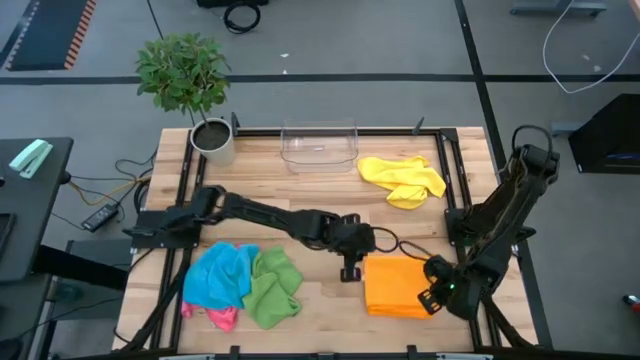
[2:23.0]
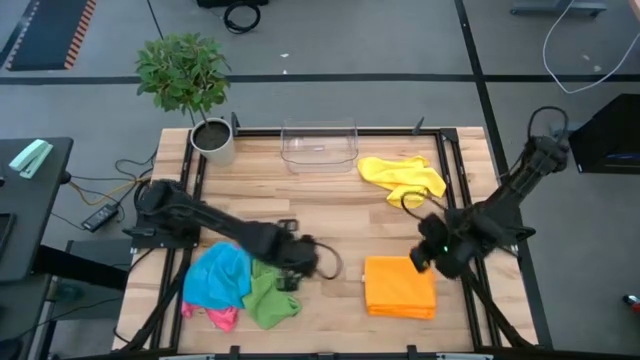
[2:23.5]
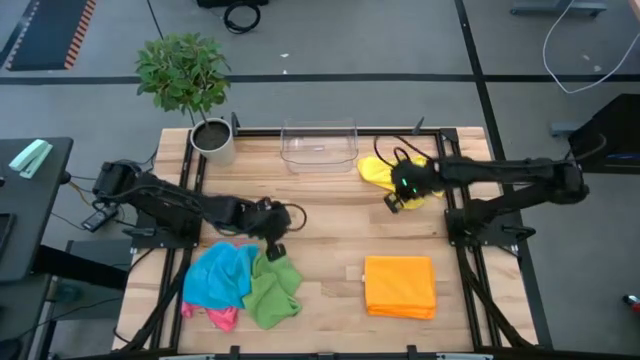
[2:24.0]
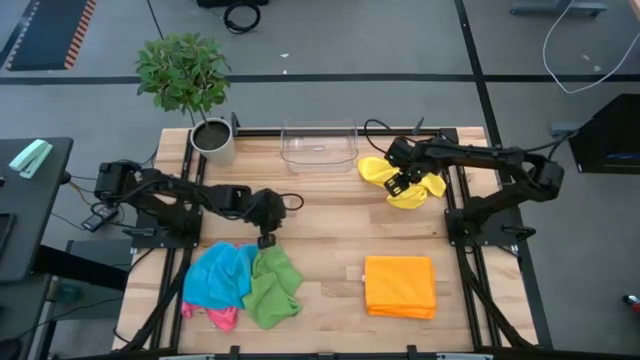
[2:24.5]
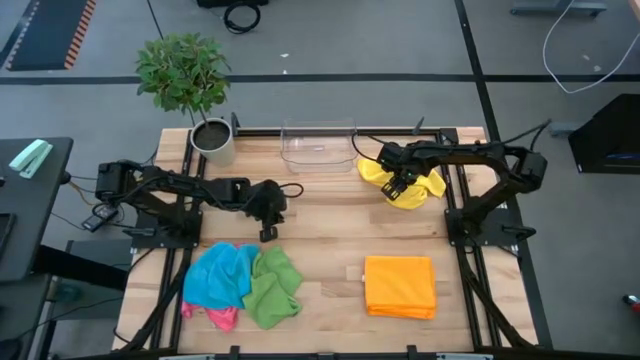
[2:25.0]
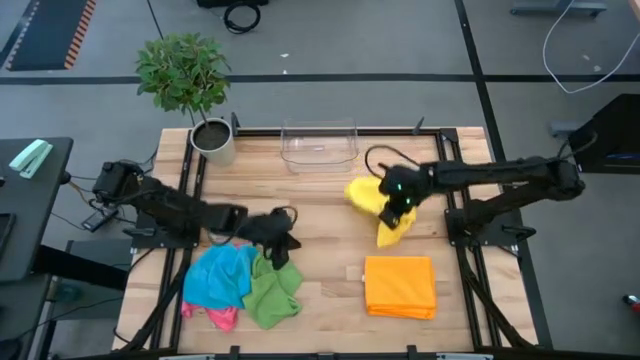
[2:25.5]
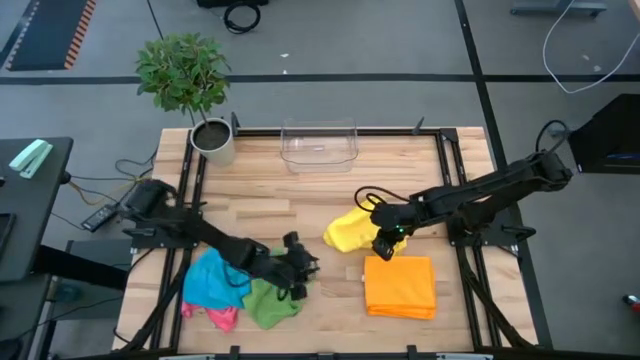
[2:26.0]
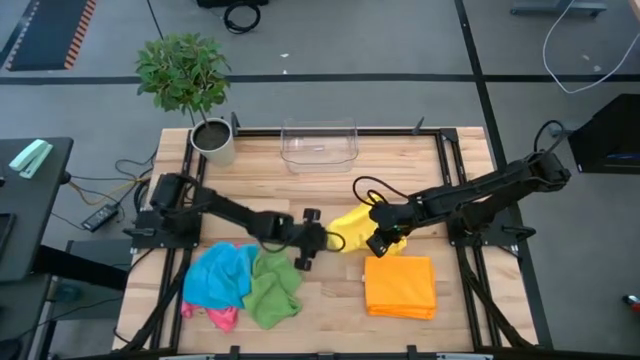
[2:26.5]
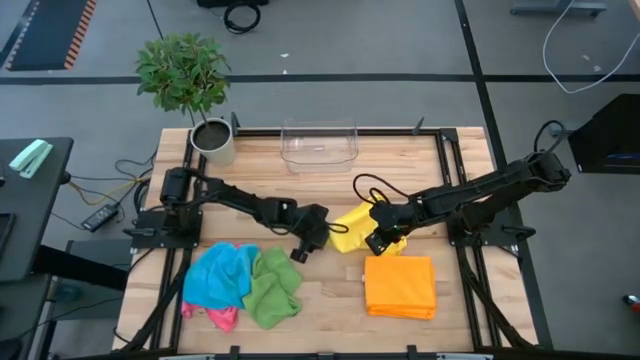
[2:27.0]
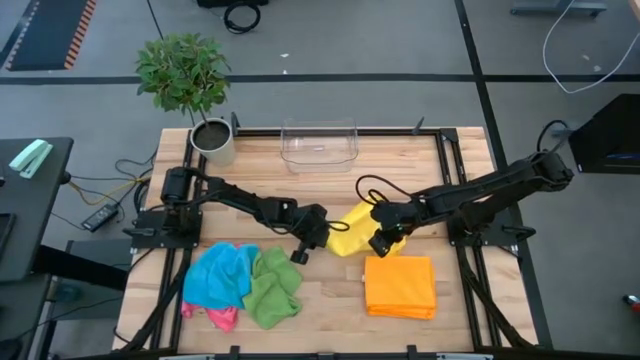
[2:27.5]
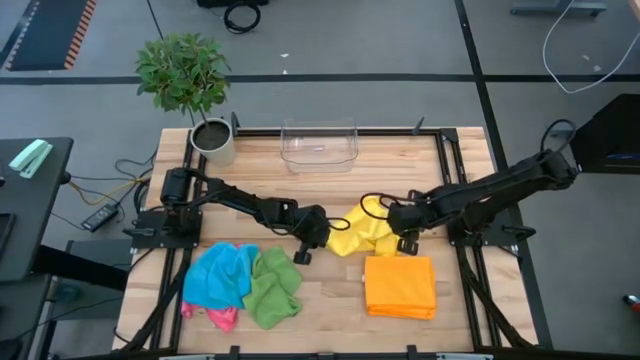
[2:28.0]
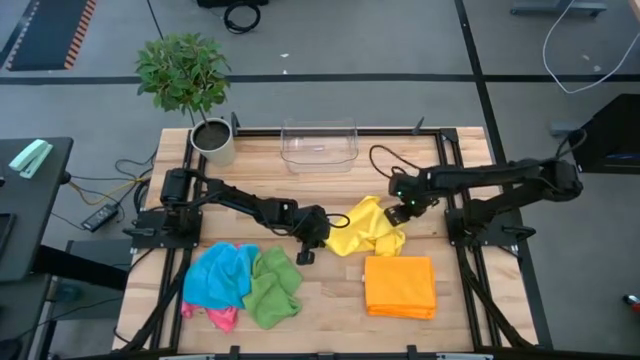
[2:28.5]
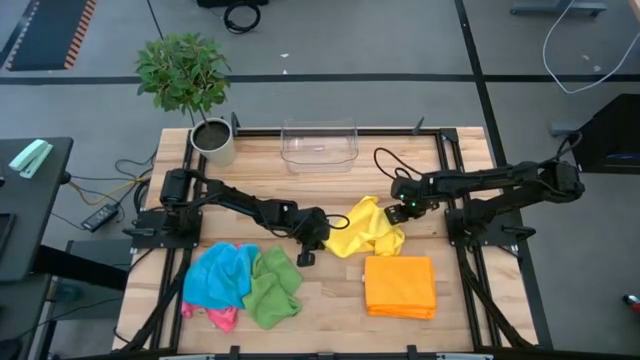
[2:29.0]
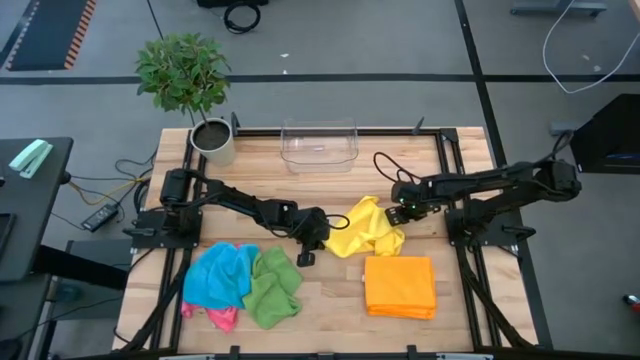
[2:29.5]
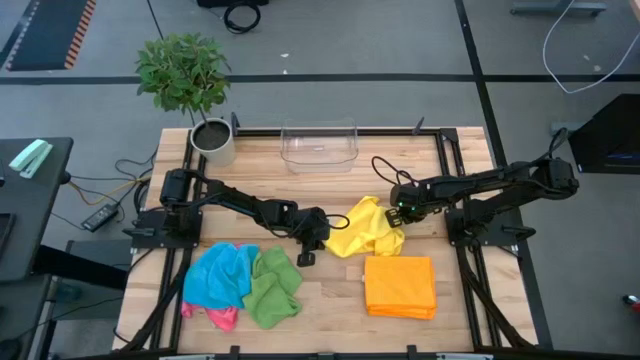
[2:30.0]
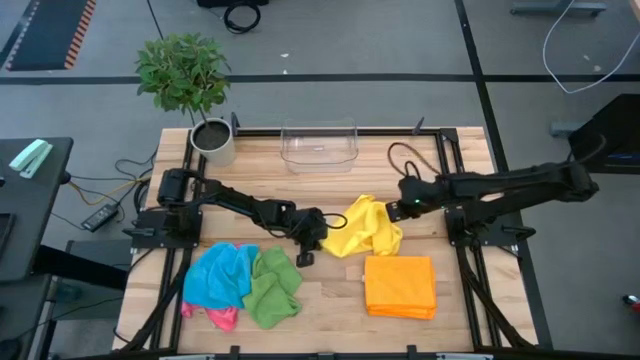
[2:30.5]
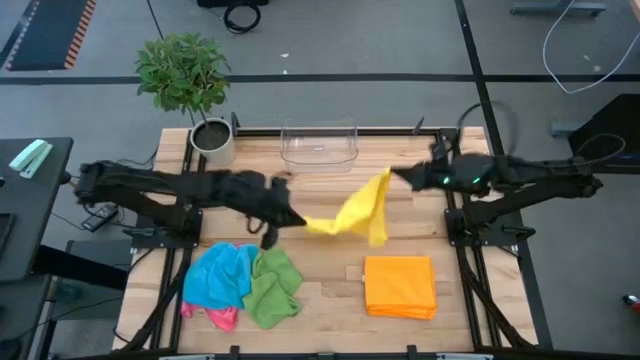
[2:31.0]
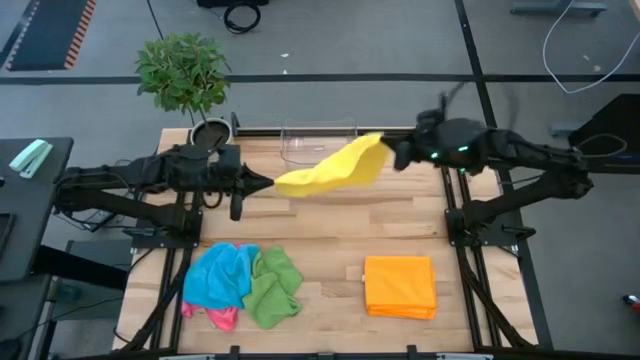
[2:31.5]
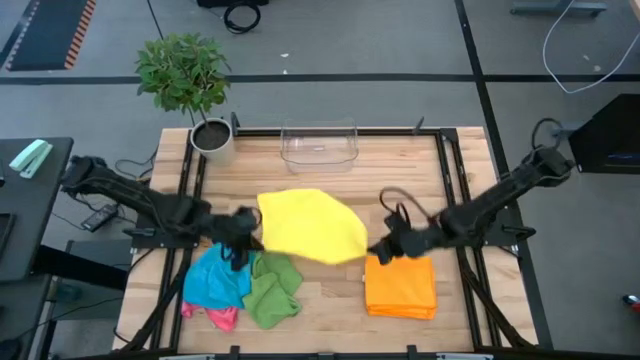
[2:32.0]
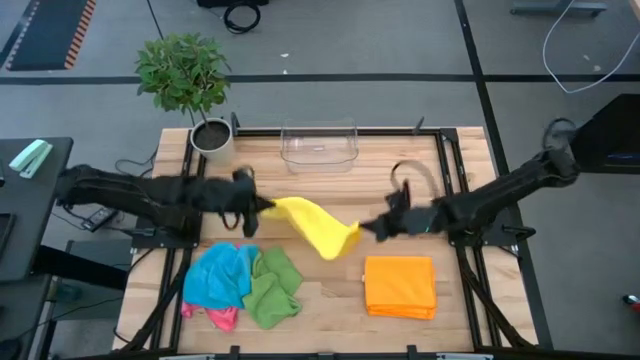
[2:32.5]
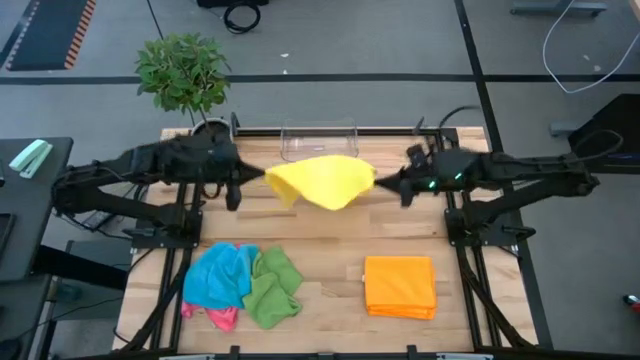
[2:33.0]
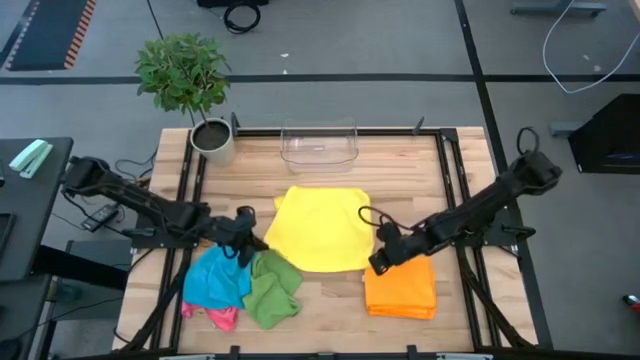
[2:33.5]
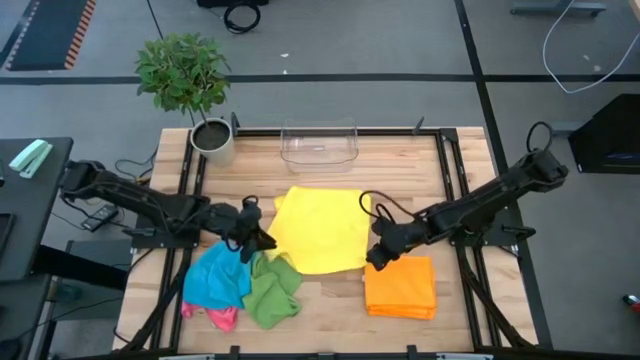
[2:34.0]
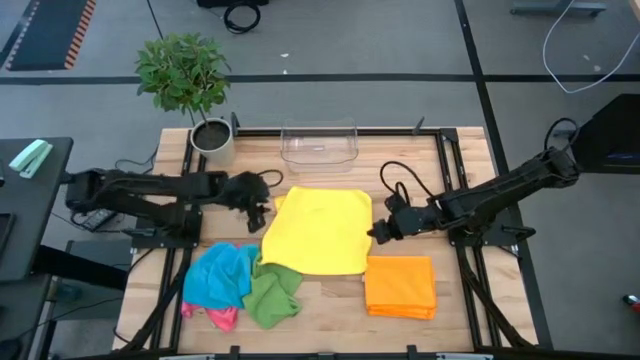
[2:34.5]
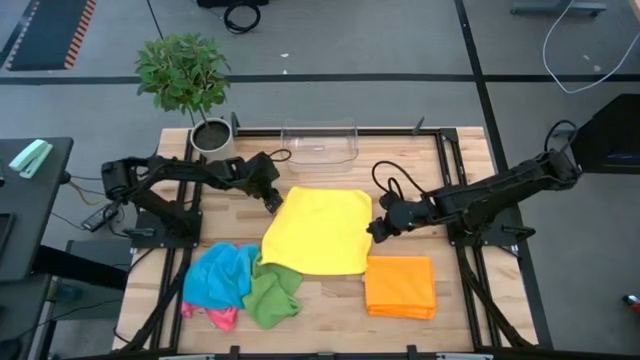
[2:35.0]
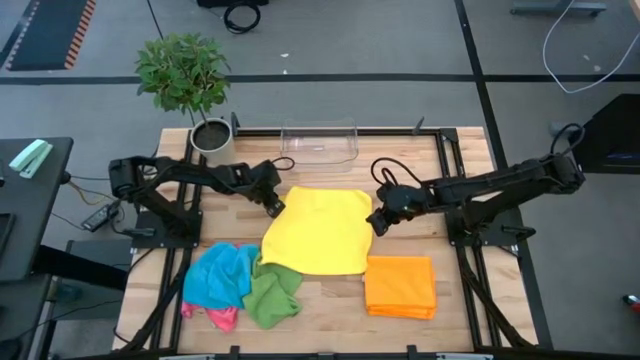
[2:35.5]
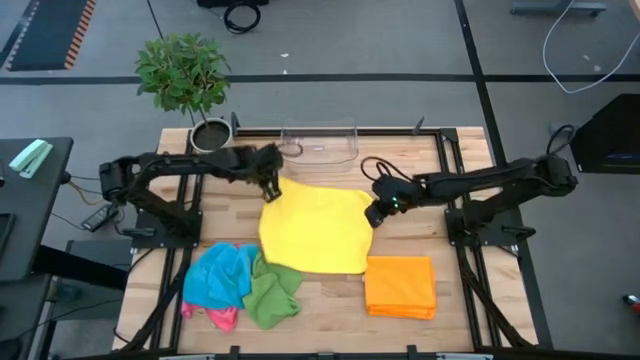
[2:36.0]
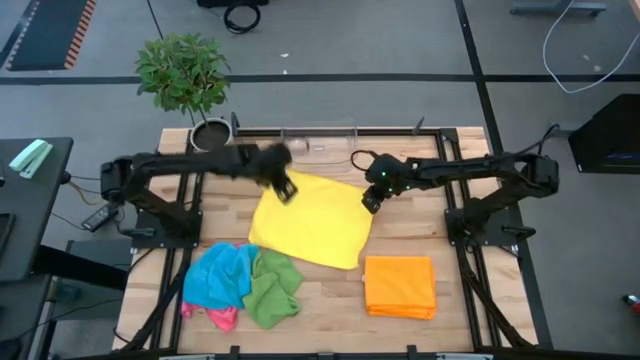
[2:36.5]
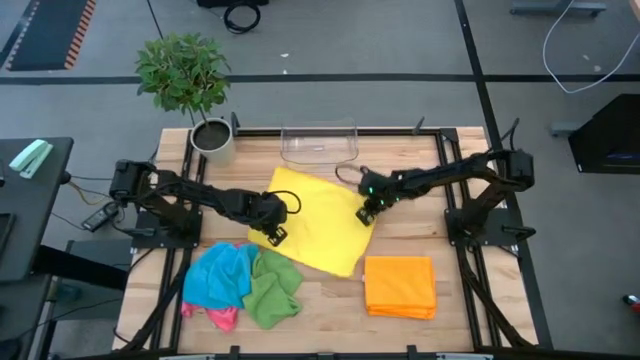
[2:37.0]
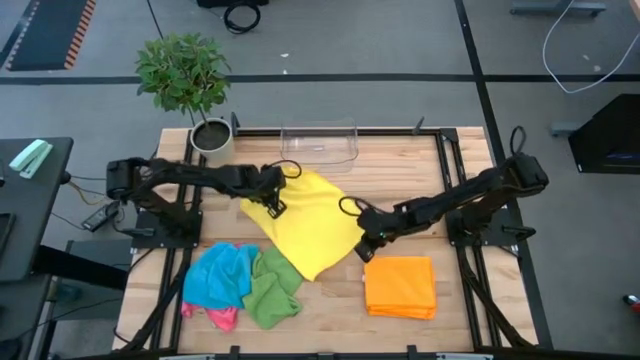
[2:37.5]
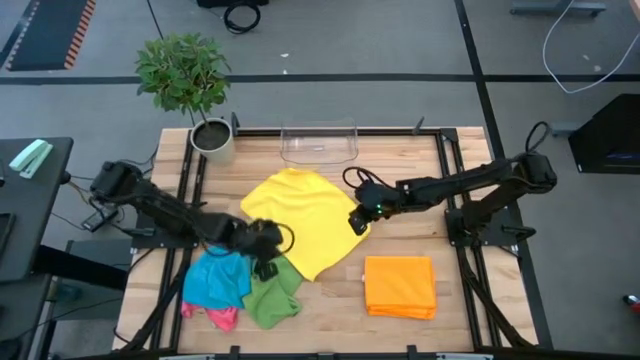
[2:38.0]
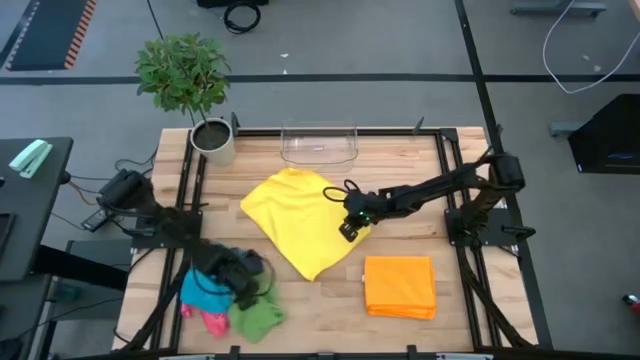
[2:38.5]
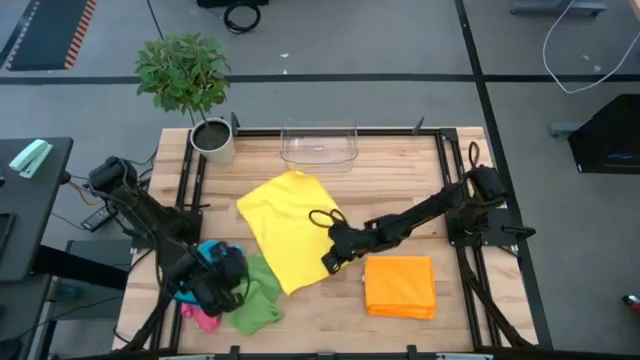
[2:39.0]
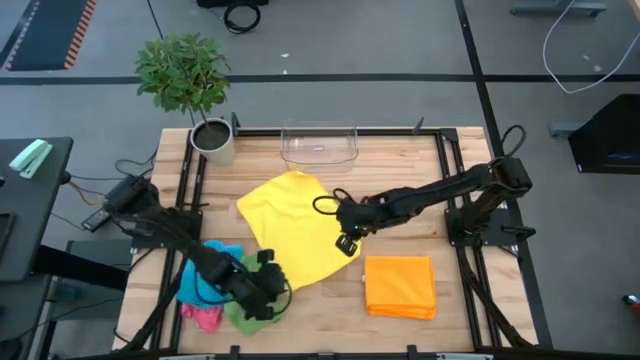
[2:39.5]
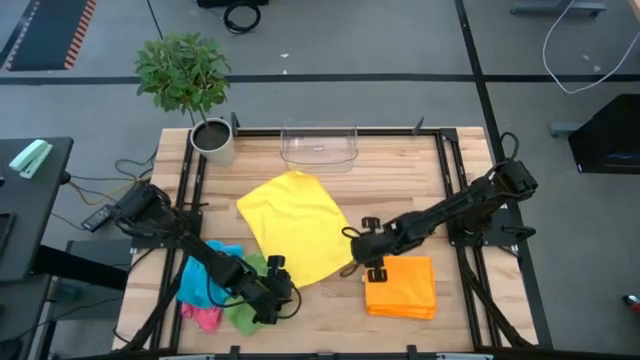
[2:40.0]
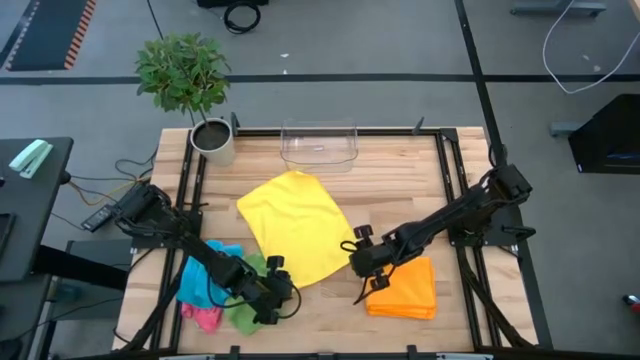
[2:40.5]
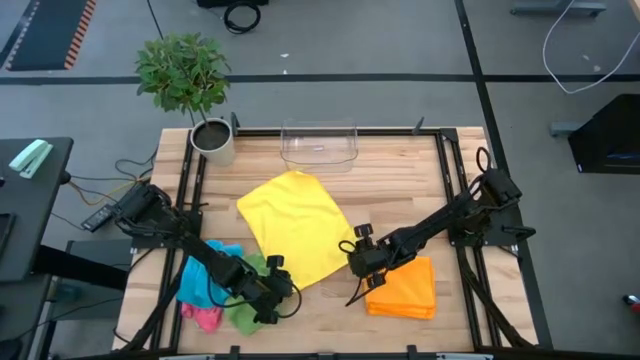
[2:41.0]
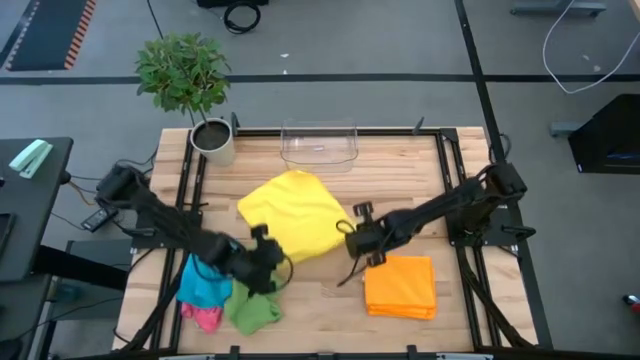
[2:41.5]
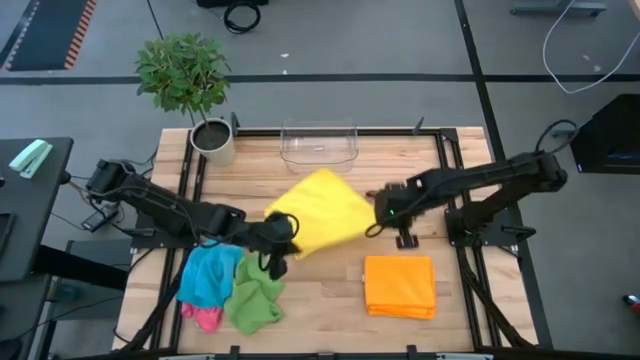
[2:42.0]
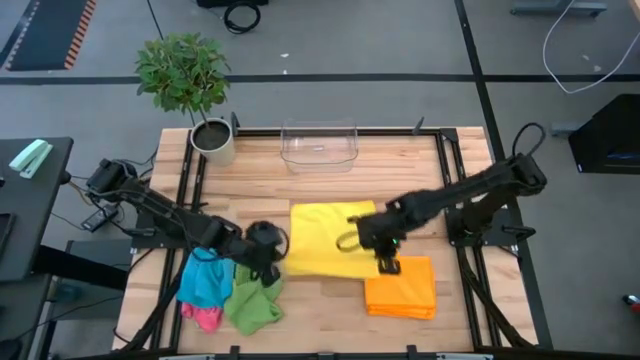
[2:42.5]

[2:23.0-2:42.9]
Task: Fold microfiber towels
Fold the yellow towel on the table
